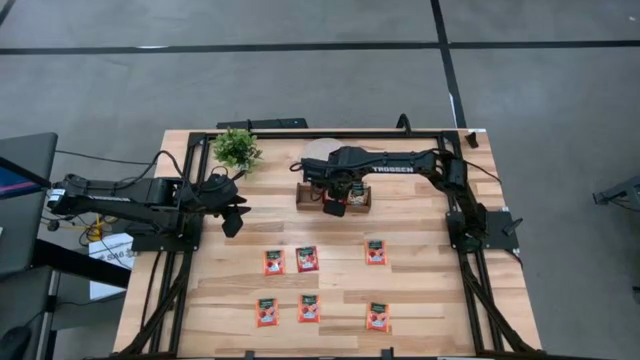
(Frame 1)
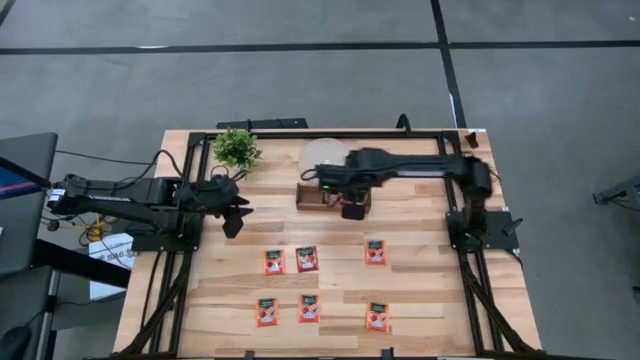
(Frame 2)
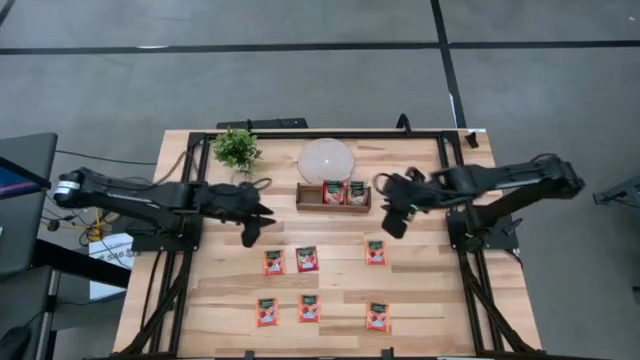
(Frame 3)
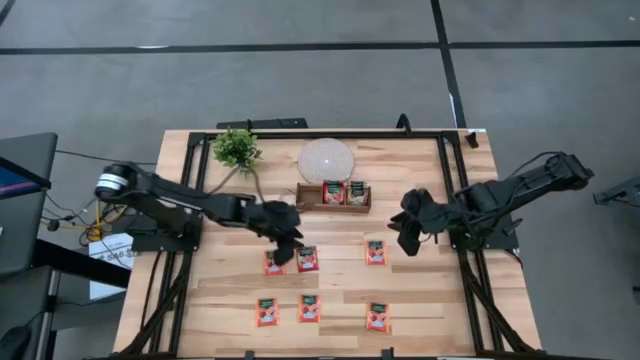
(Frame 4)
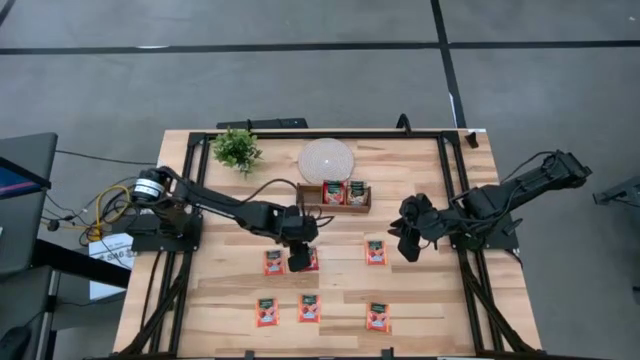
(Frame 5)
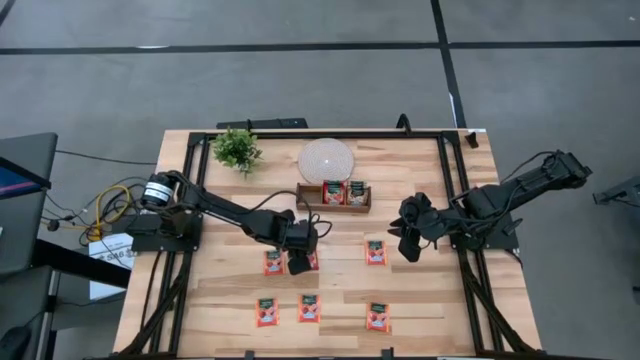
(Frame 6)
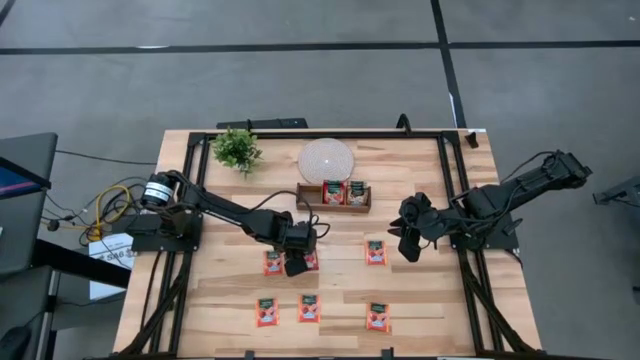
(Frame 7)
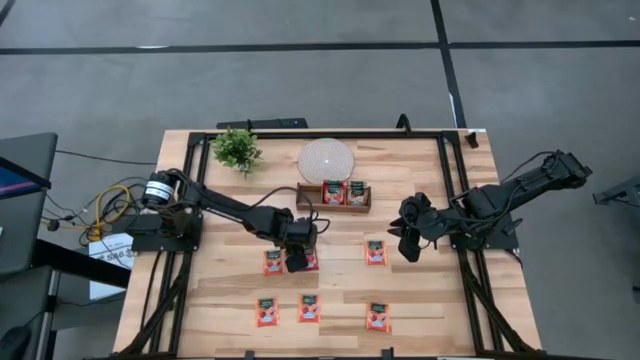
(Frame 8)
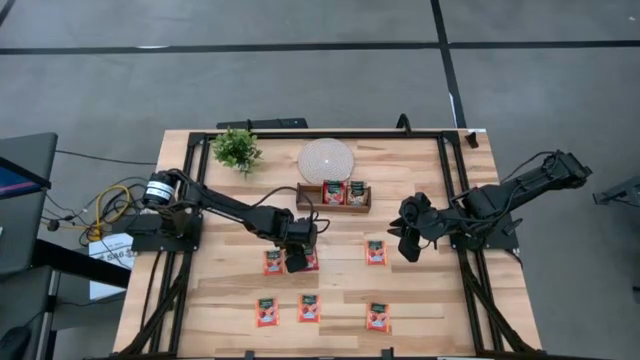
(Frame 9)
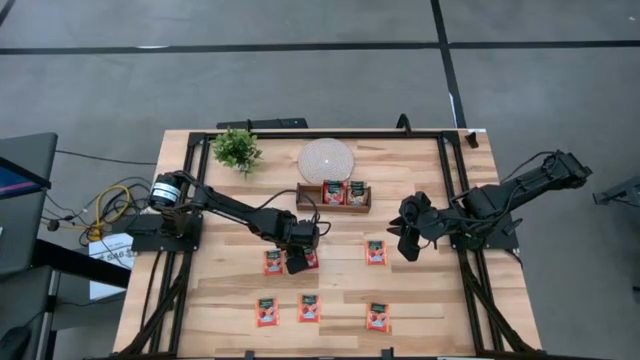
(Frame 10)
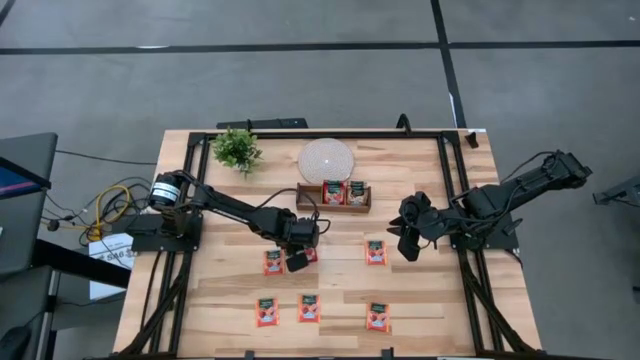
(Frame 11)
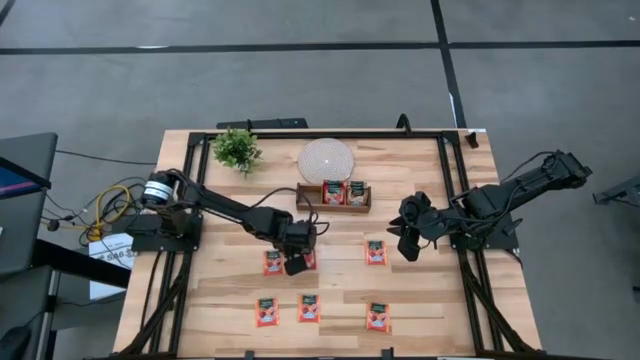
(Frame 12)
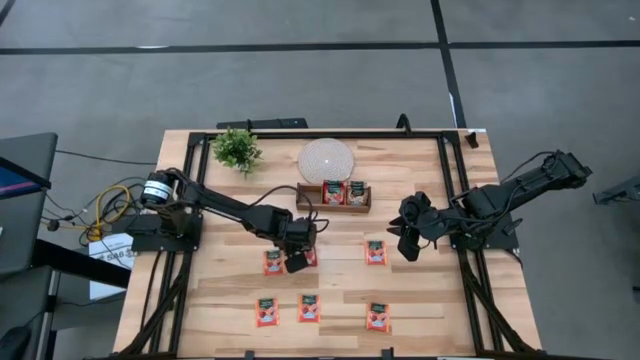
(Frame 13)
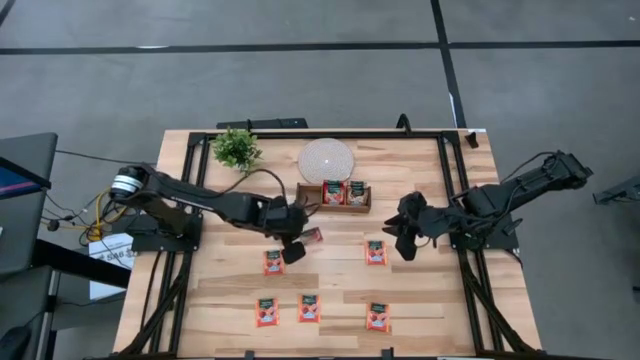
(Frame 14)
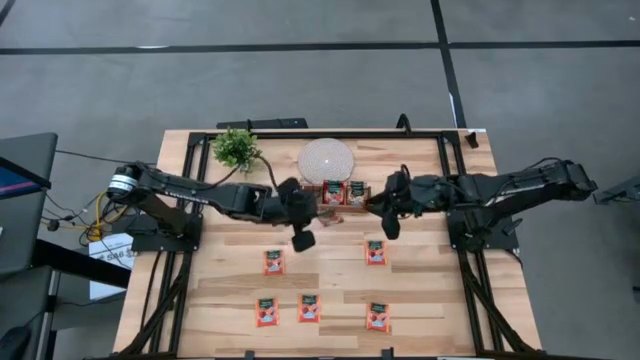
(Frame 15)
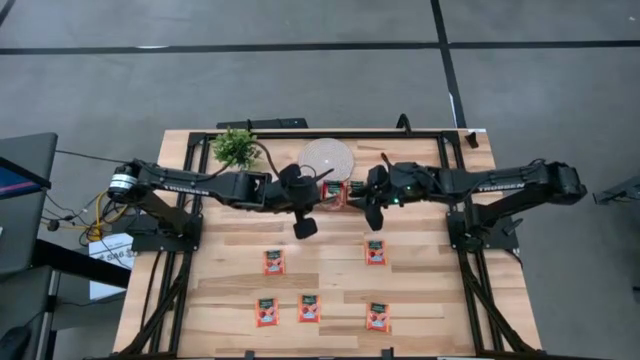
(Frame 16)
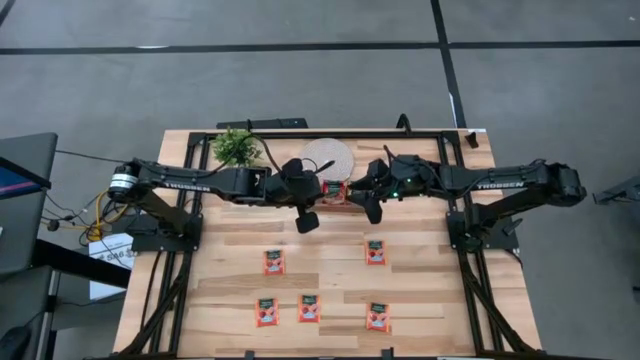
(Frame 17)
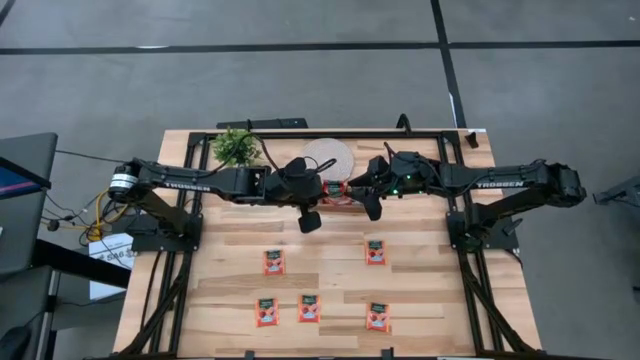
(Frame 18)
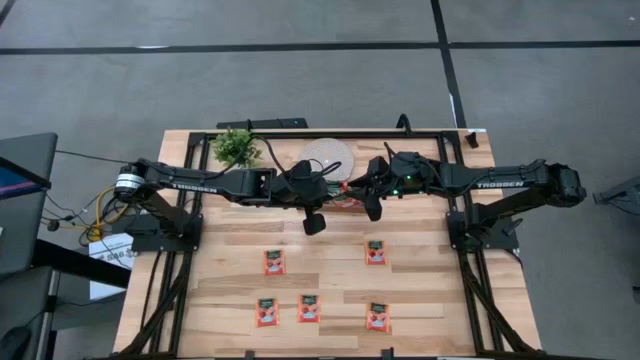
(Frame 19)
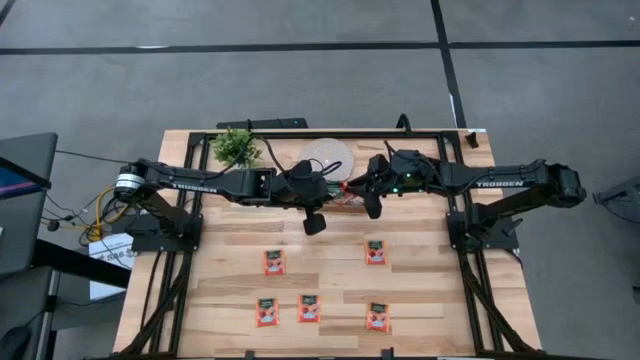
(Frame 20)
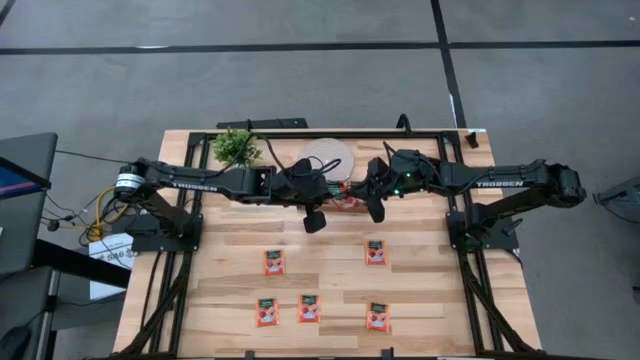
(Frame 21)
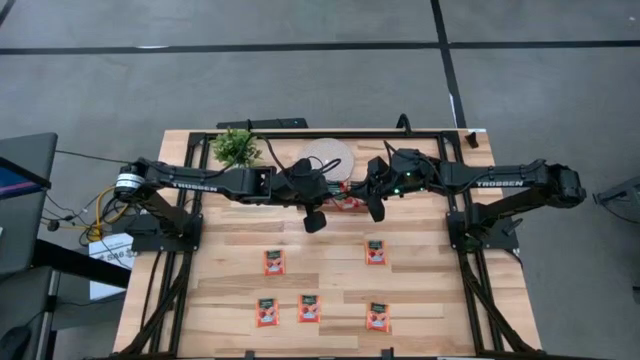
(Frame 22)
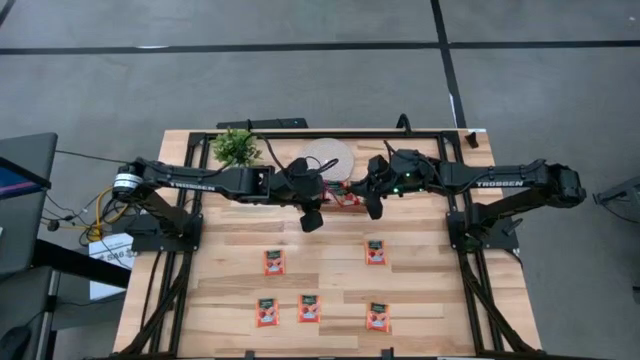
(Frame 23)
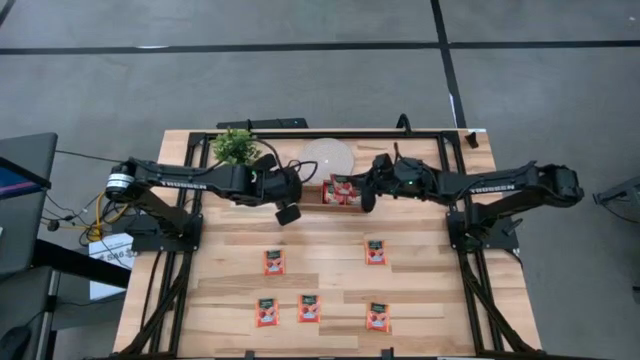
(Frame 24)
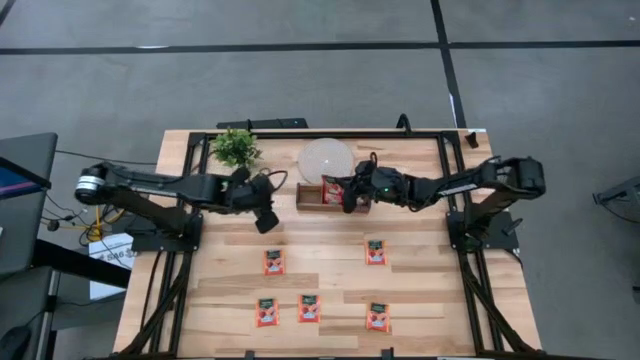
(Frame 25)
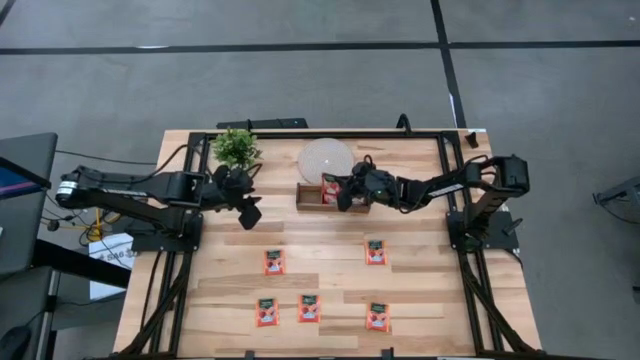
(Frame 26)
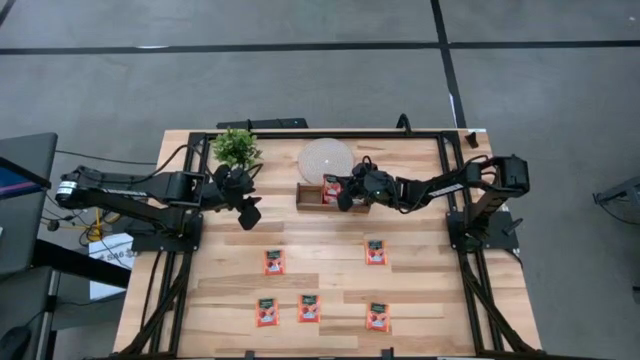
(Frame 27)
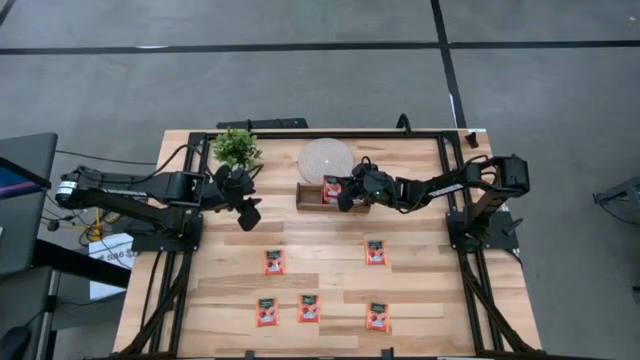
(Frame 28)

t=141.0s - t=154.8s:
Task: Pick & Place Tea
Put the red tea bag into the middle section of the wooden organizer

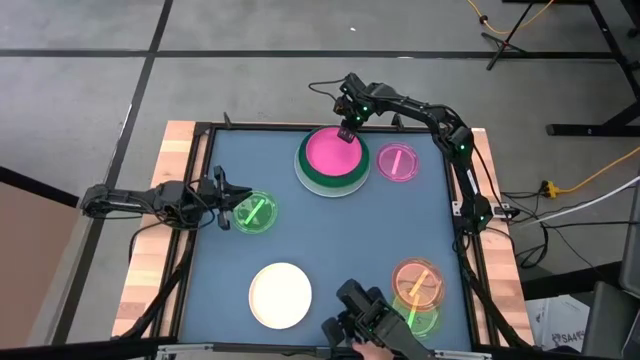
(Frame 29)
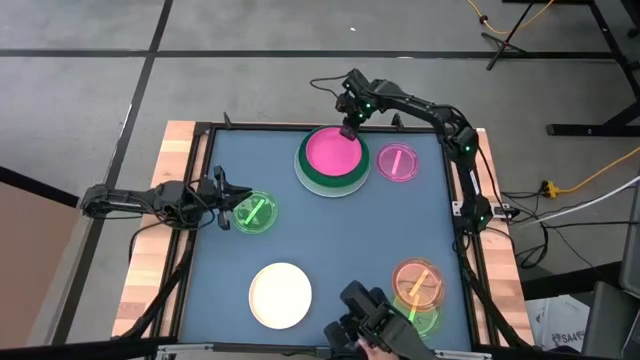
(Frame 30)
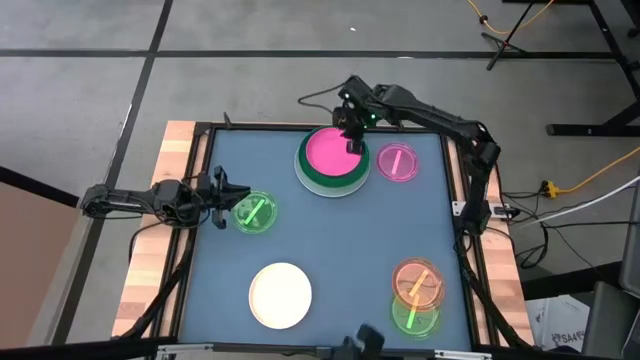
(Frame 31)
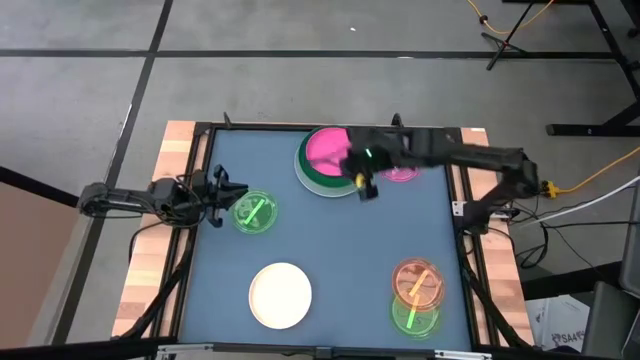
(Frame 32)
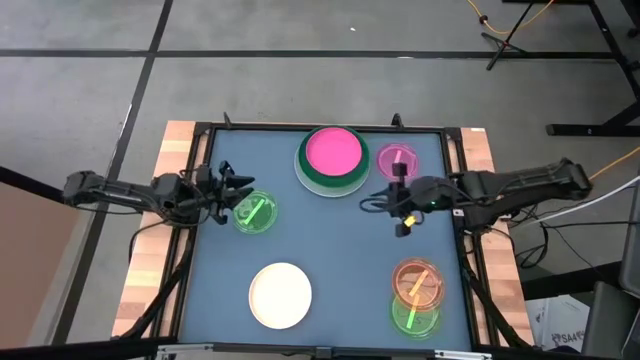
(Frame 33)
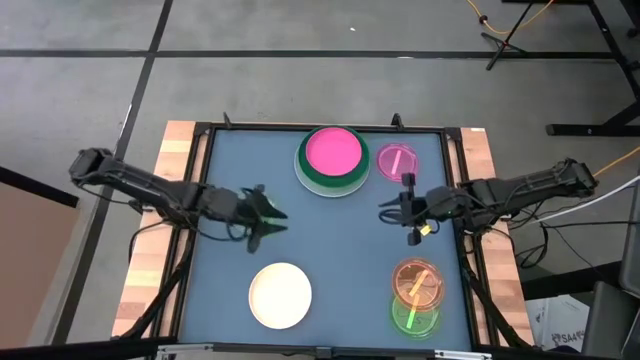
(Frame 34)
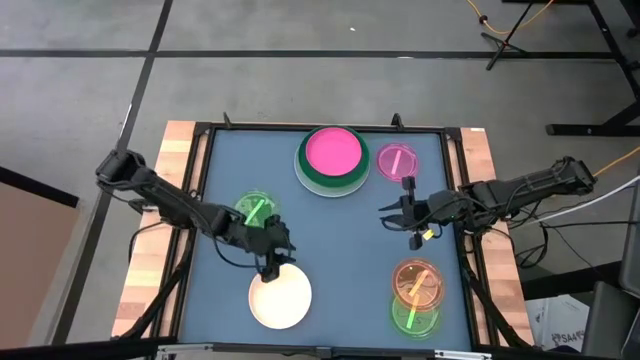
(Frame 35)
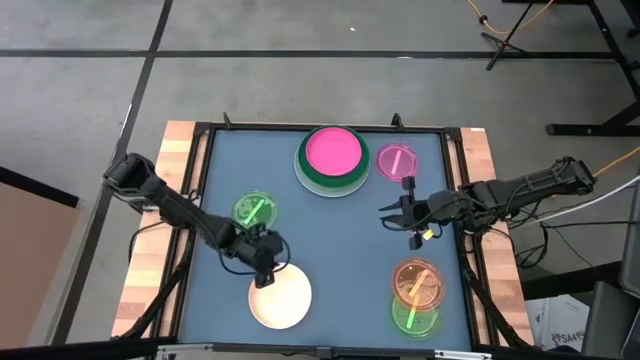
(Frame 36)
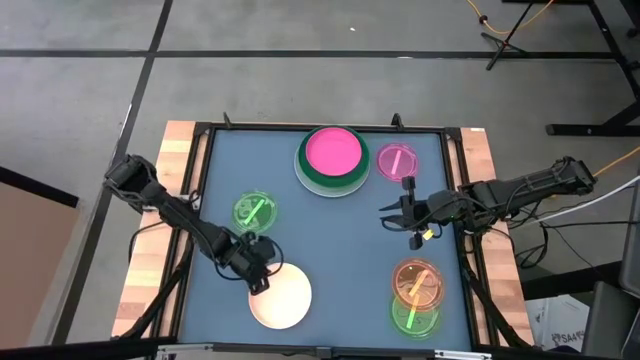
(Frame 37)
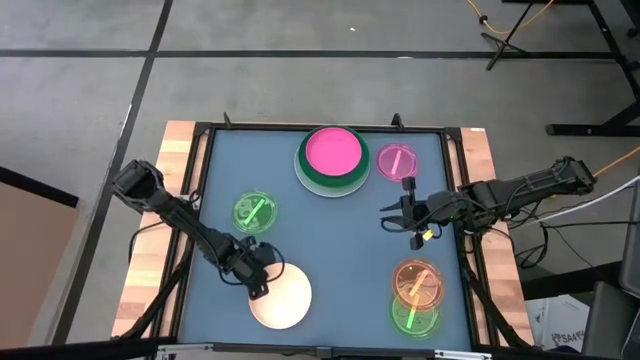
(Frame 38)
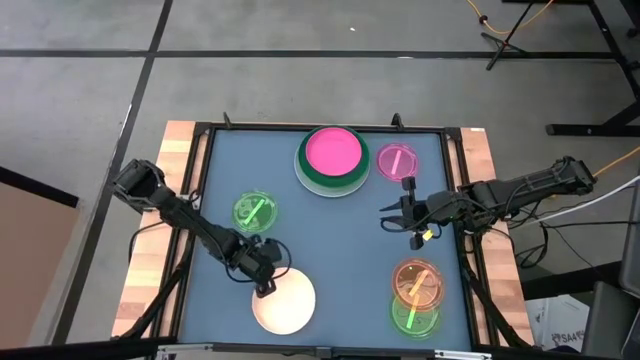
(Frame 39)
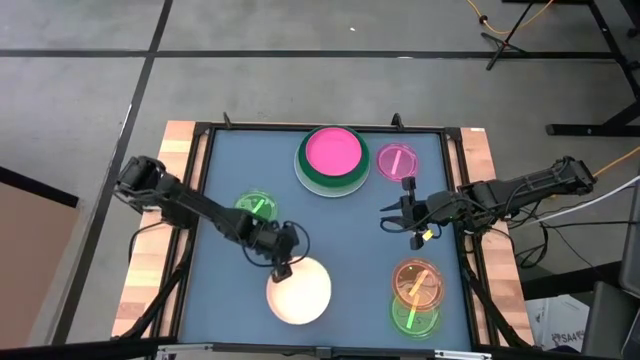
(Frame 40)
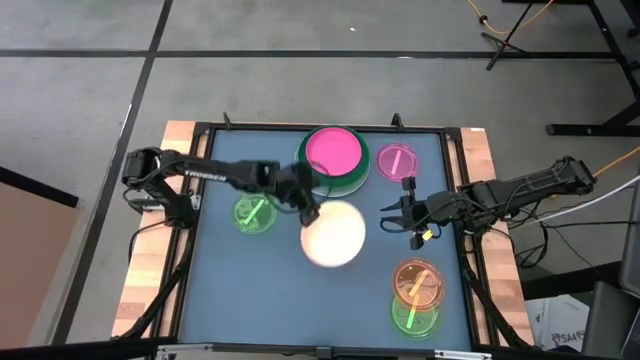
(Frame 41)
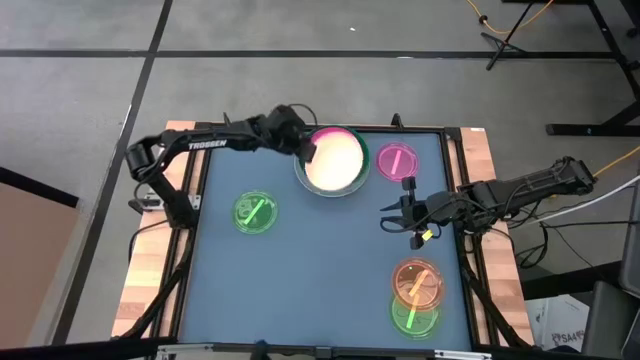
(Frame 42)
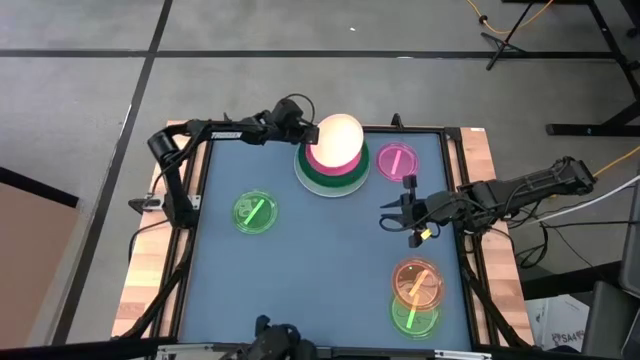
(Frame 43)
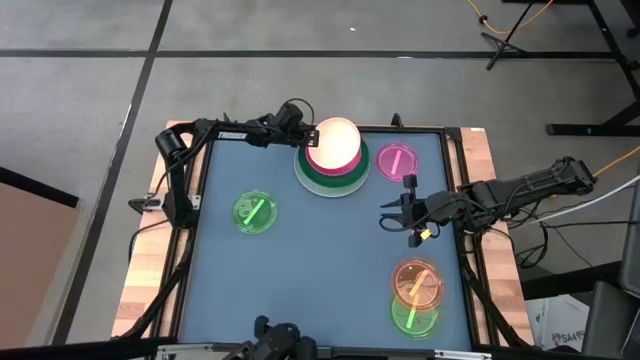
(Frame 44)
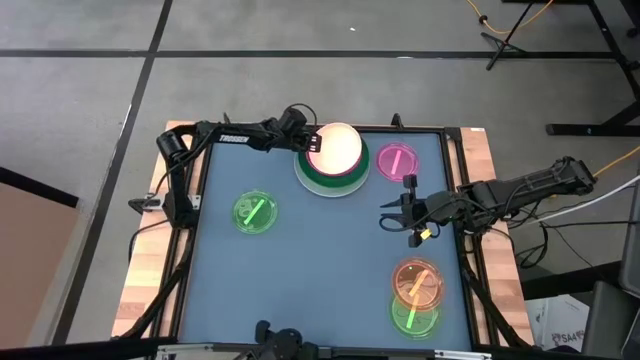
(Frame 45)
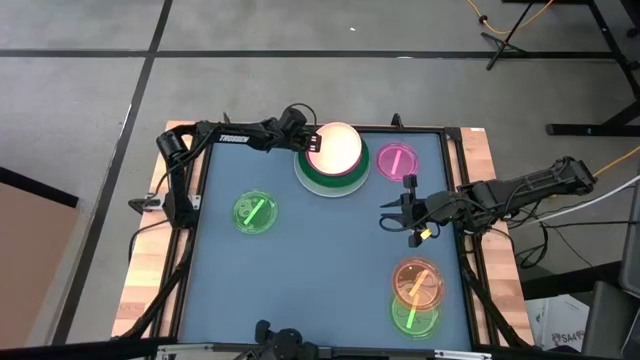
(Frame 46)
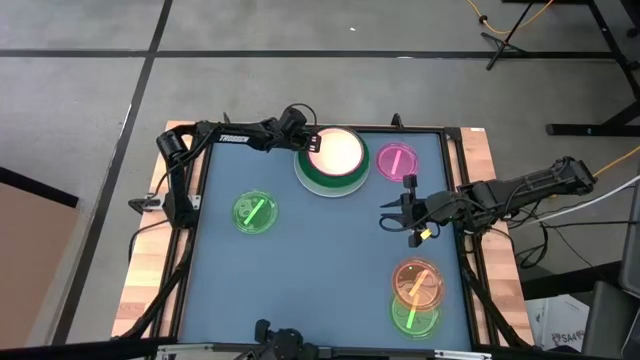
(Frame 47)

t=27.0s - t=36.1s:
Task: Stack plastic plates
Stack the white plate on top of the pink plate
